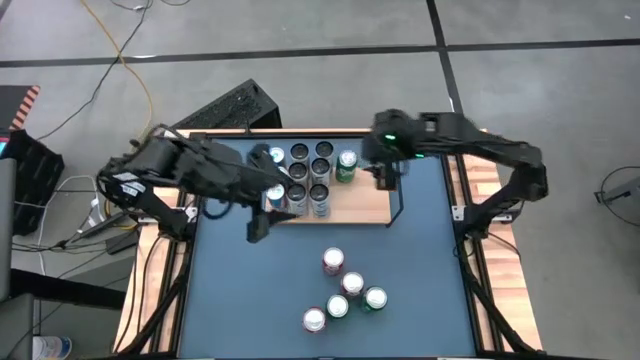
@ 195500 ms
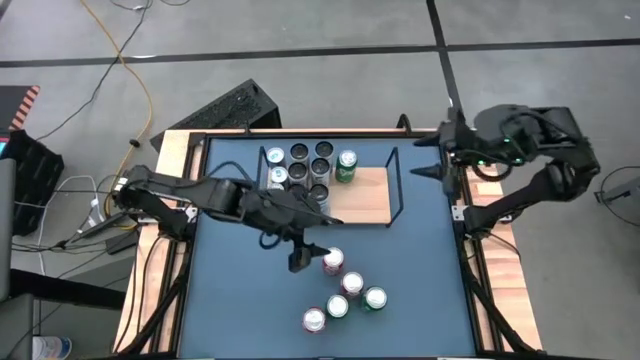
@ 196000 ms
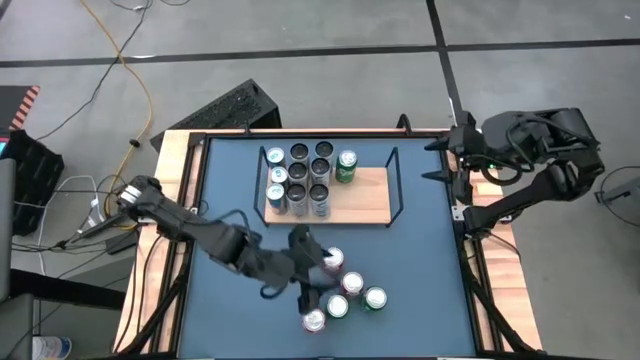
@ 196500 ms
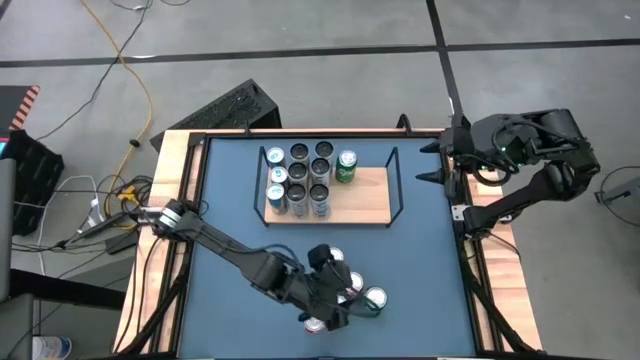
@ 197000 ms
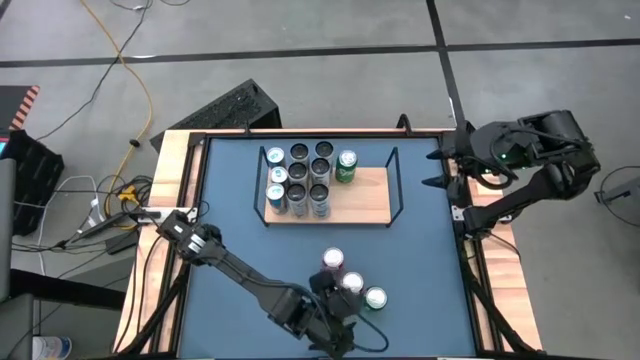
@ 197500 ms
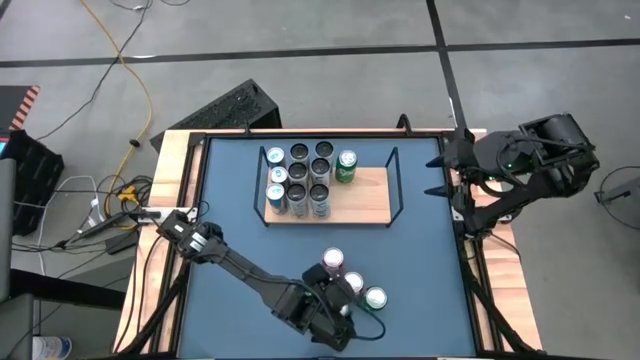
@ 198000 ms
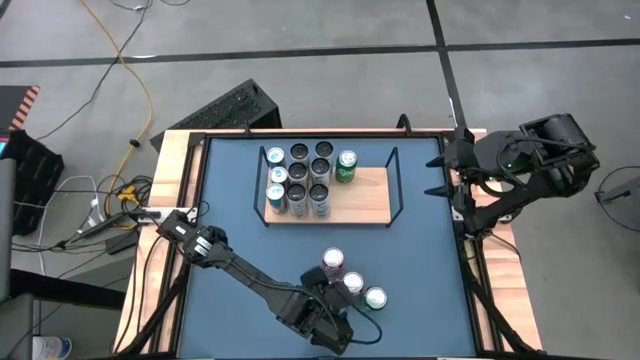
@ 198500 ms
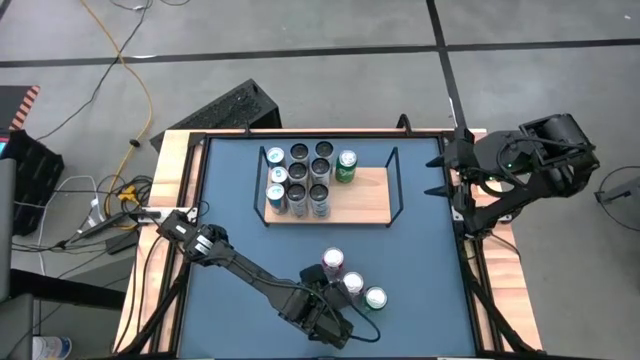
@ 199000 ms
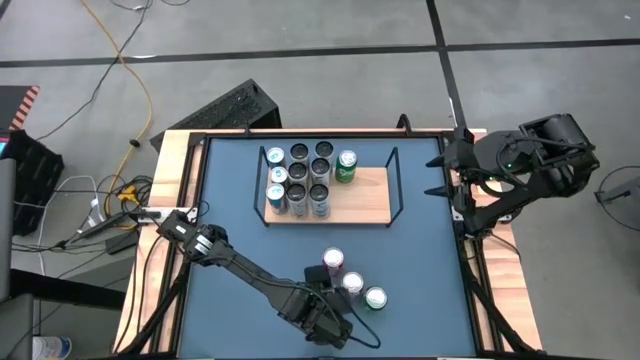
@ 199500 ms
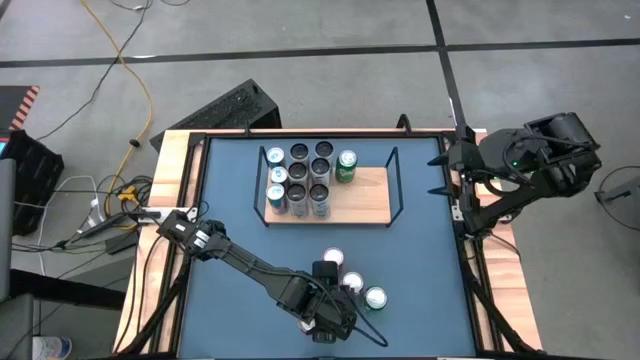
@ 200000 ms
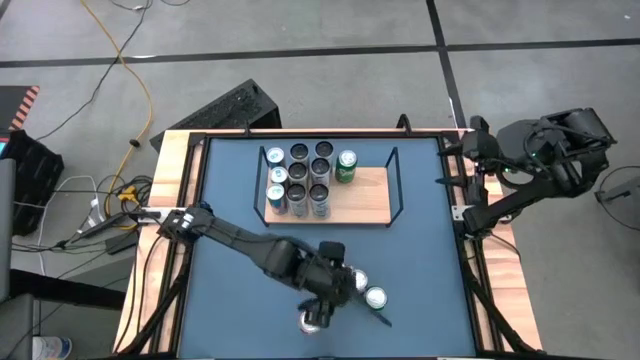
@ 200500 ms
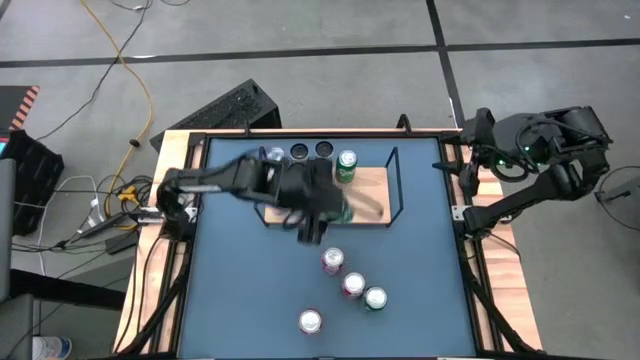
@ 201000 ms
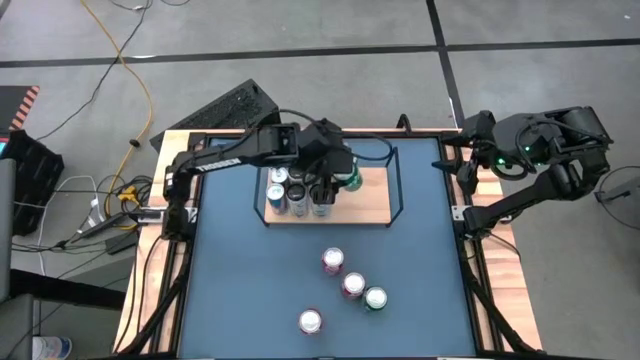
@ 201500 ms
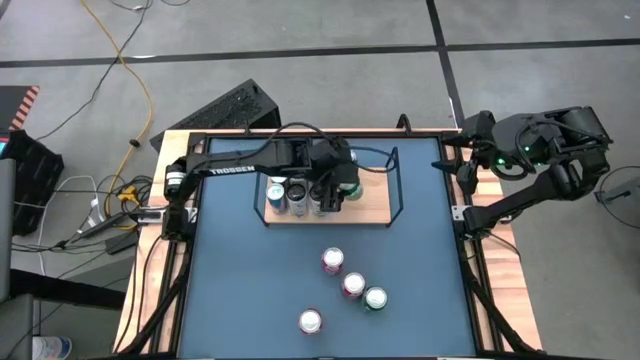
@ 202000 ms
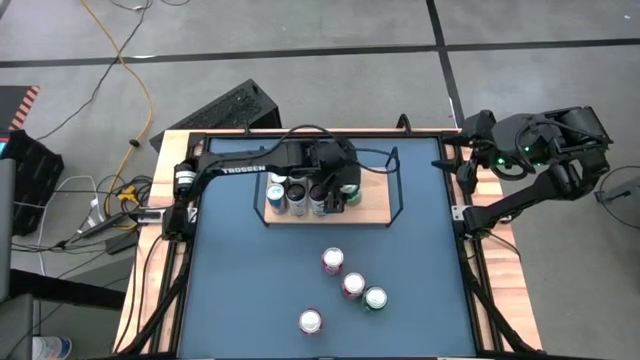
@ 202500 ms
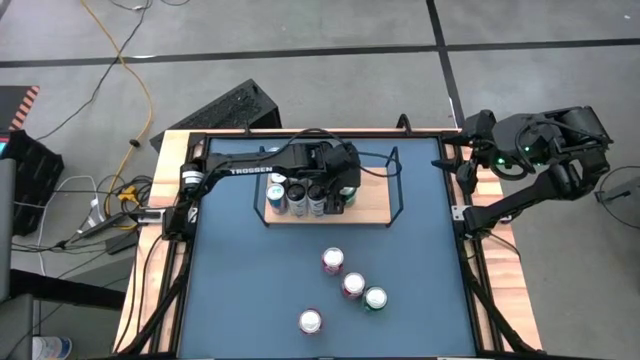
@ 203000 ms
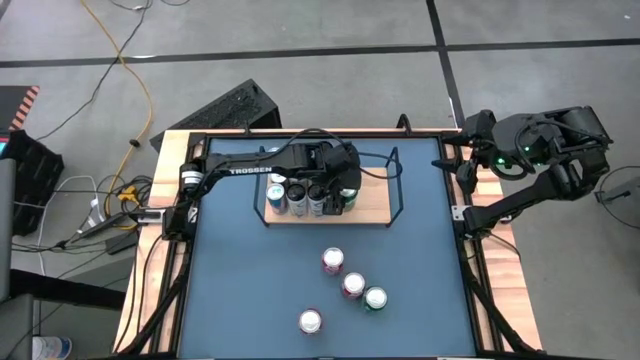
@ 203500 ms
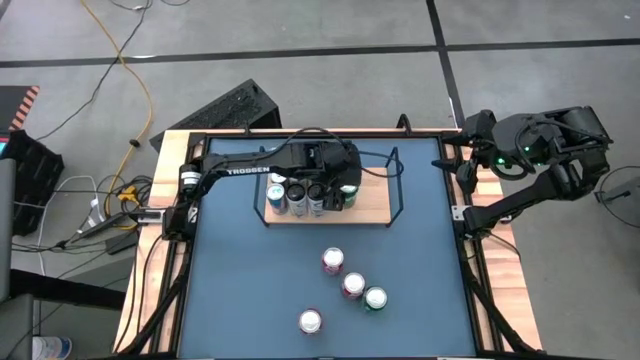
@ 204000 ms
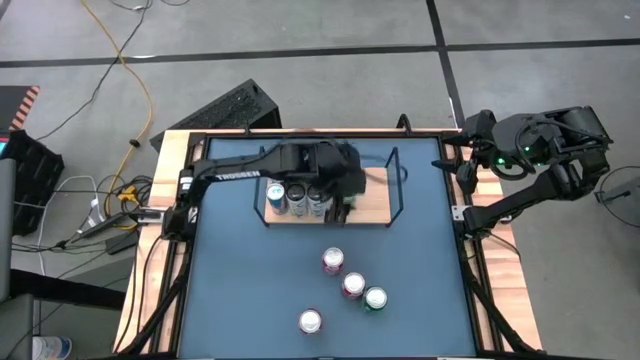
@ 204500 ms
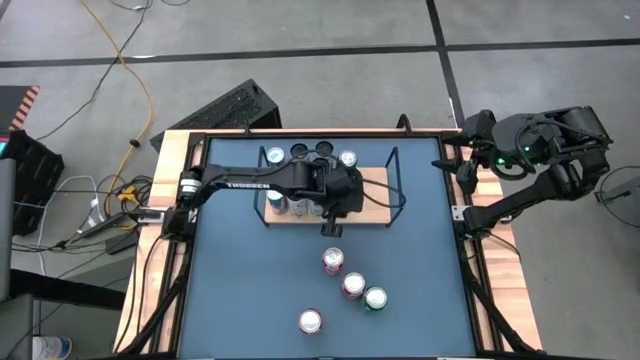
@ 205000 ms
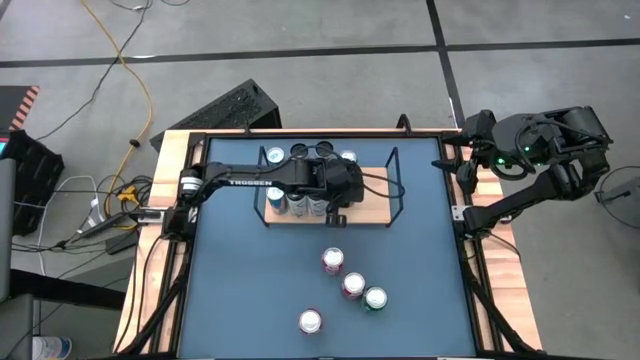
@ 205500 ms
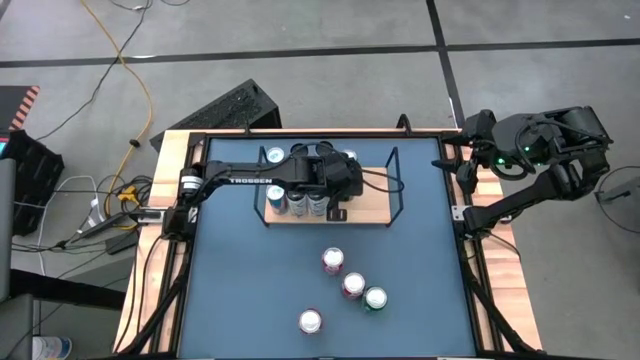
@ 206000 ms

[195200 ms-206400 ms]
Task: Place canned beverage on shelf
Put the left green soda can on the shelf aligned with the other green soda can

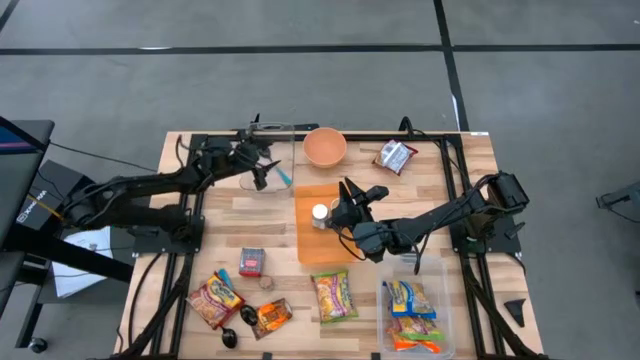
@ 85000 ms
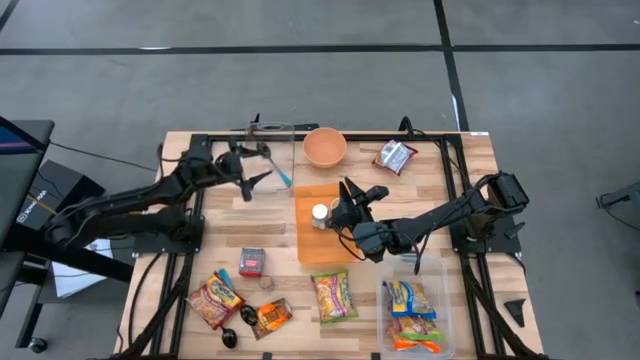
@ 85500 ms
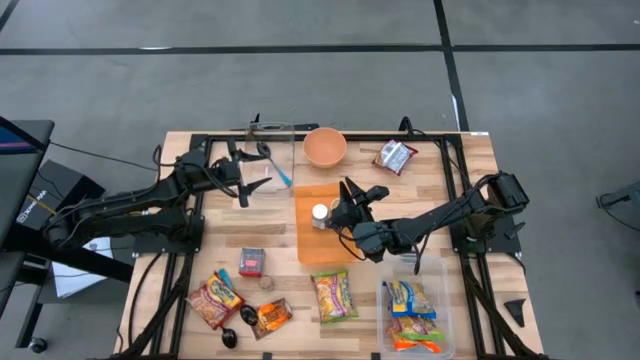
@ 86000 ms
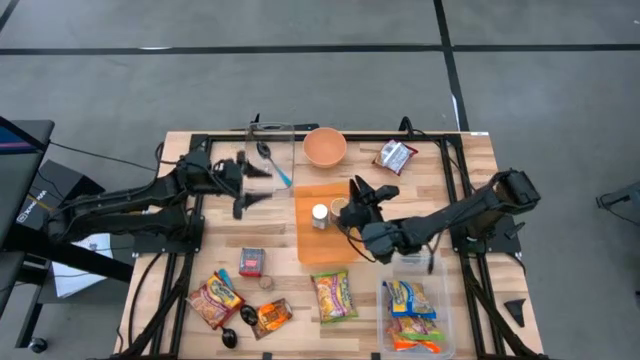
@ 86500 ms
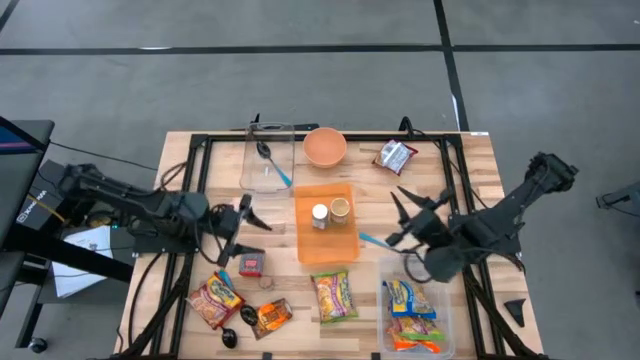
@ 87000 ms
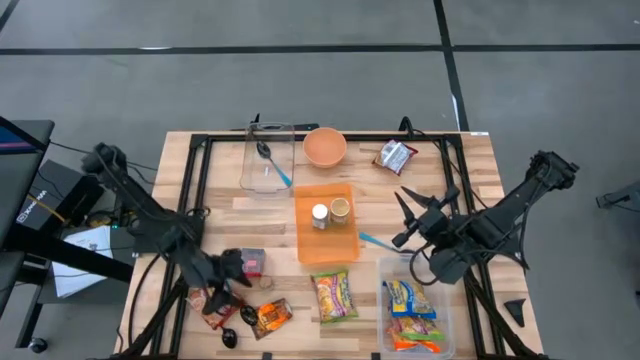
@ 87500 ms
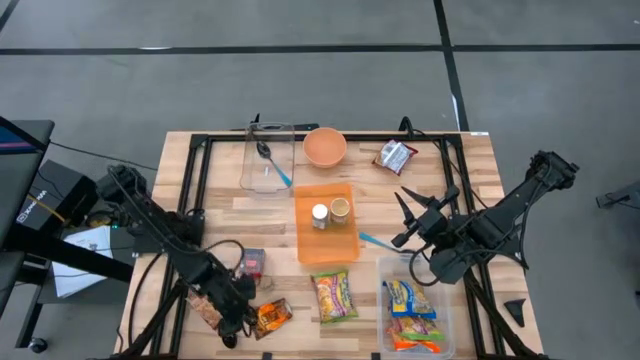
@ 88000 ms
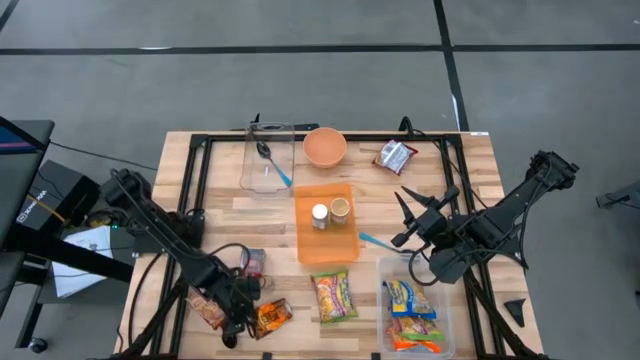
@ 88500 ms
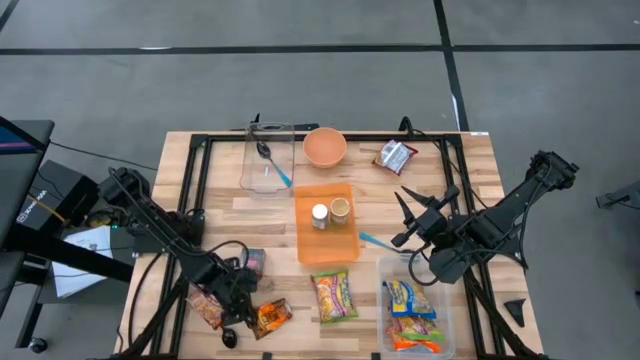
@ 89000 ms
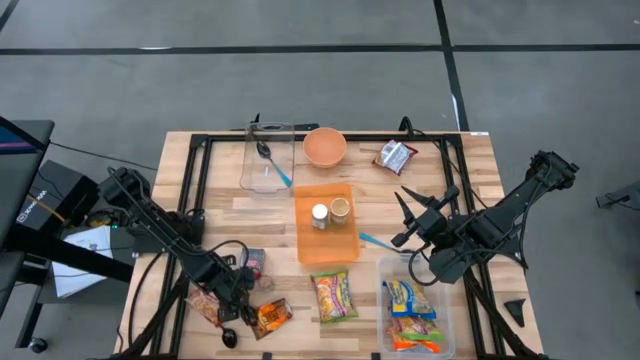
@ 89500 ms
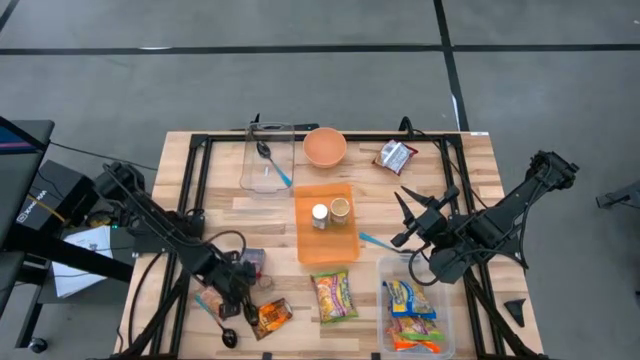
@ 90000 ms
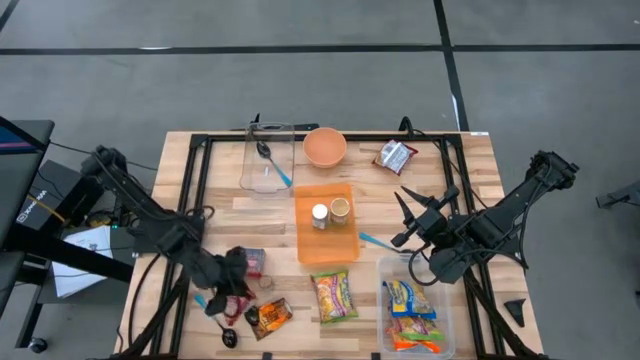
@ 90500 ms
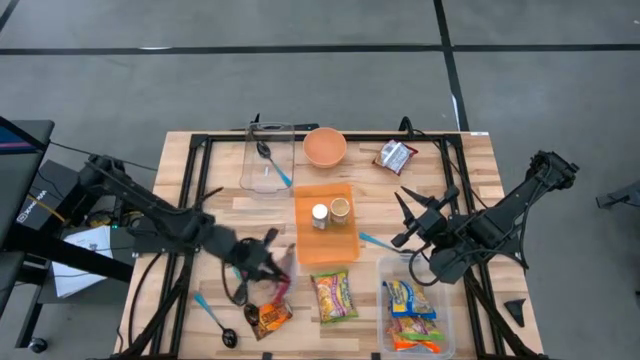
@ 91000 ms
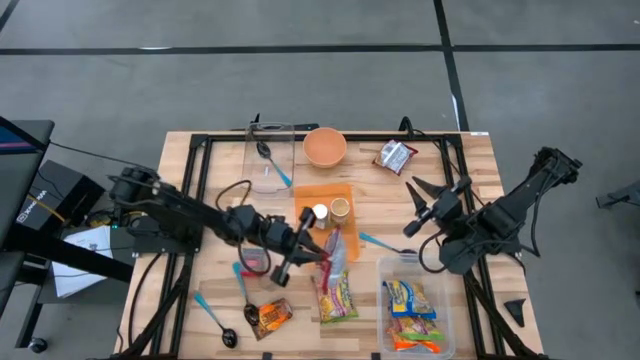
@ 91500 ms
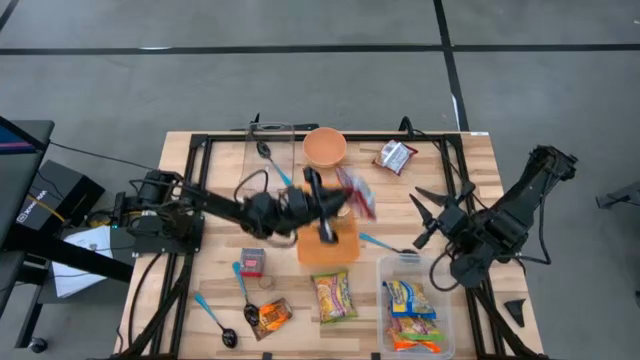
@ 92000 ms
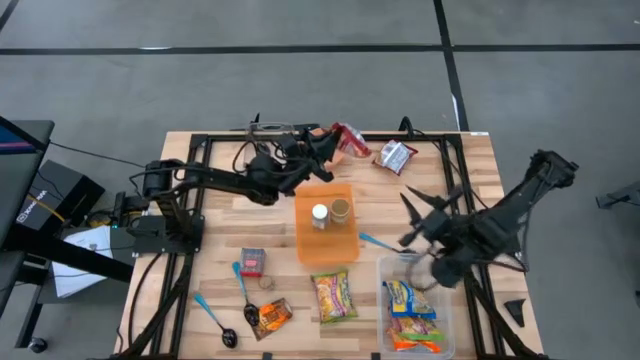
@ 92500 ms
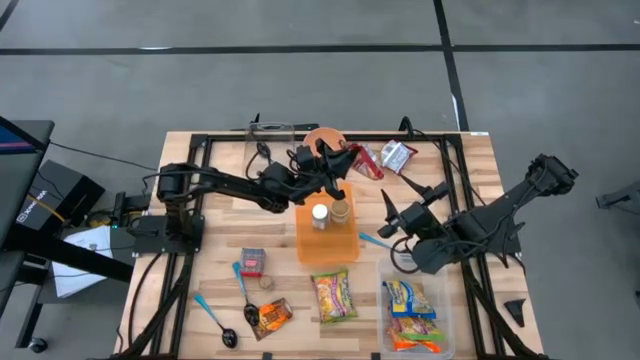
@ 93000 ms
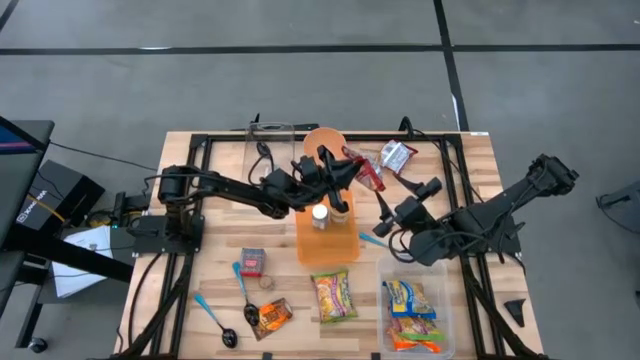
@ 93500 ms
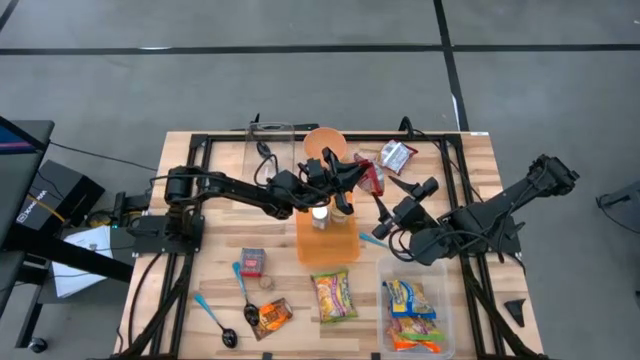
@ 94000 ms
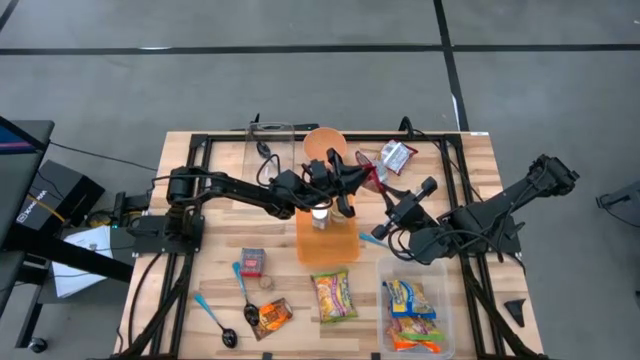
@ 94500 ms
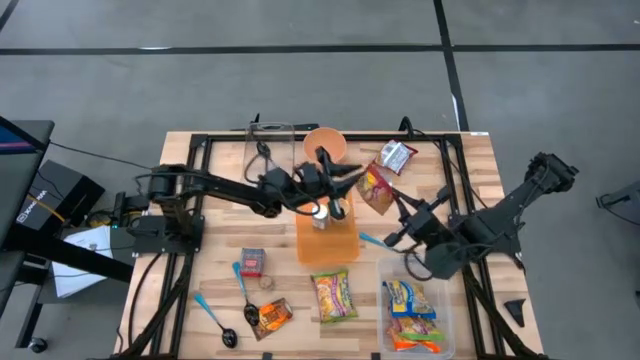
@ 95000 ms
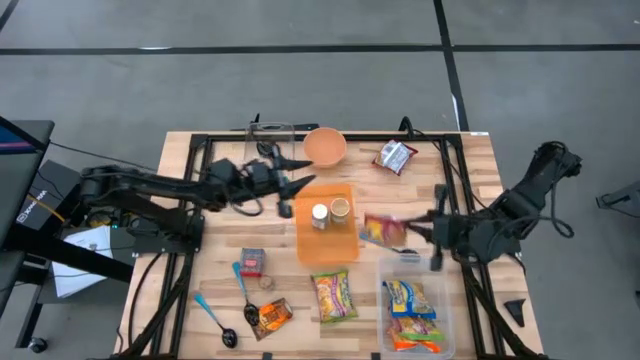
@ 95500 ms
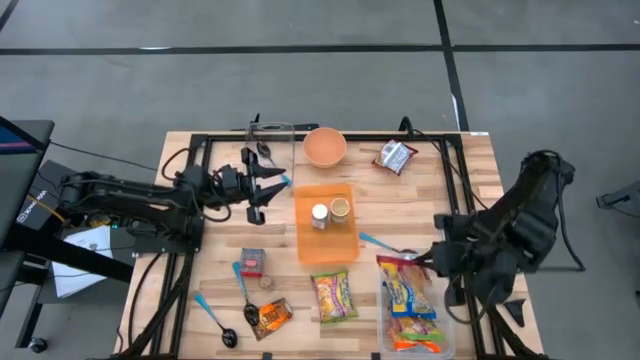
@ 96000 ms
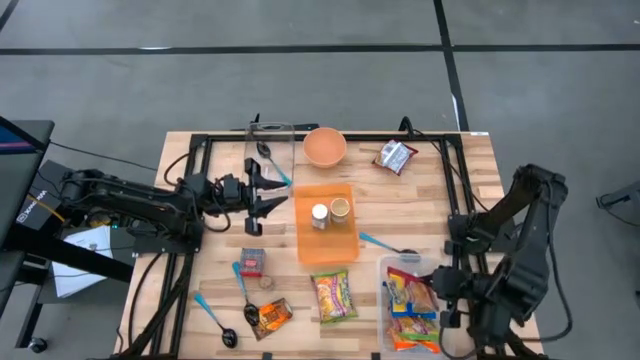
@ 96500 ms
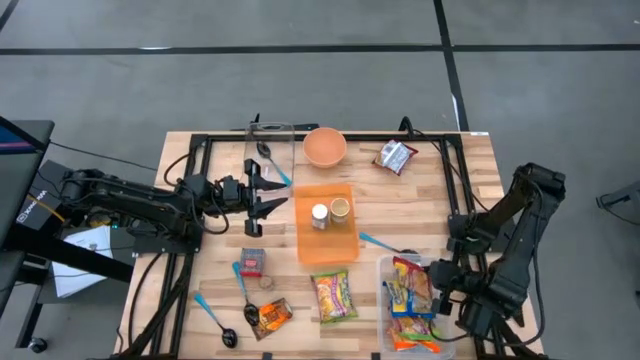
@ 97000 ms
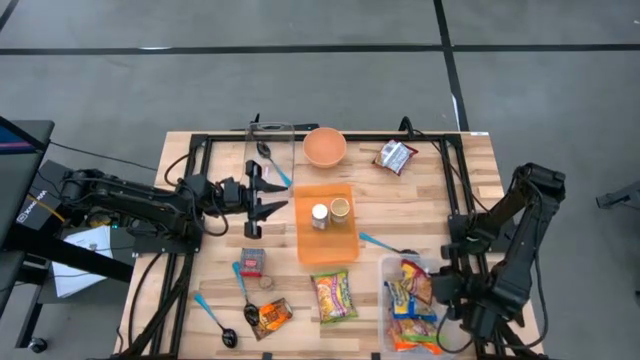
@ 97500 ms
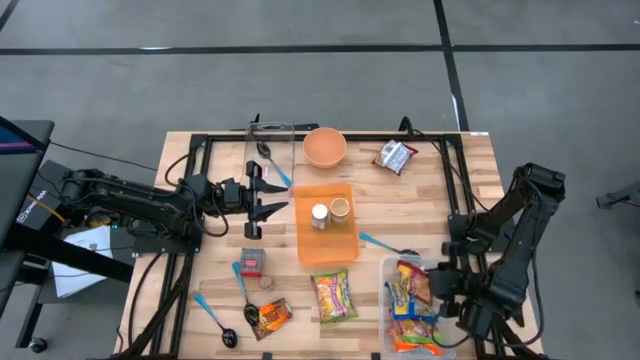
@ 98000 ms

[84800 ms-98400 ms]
Task: Pick & Place Food Item
Put the red noodle pack into the transparent container
